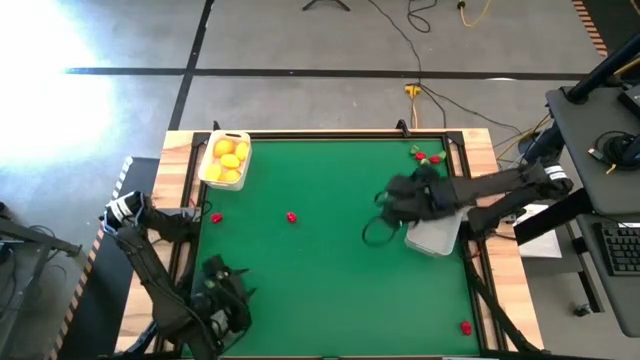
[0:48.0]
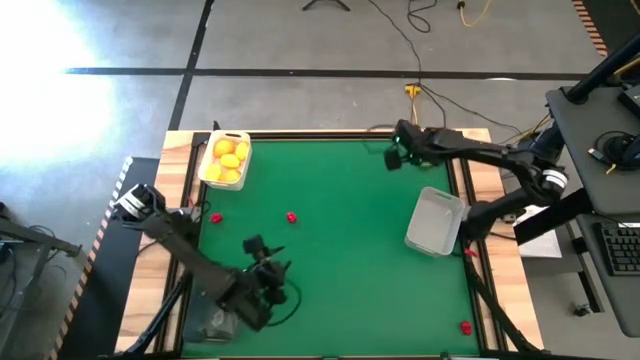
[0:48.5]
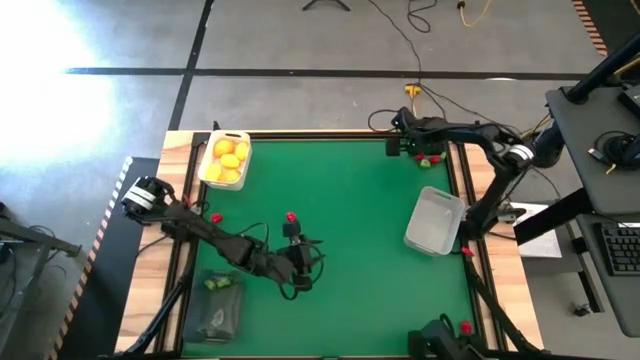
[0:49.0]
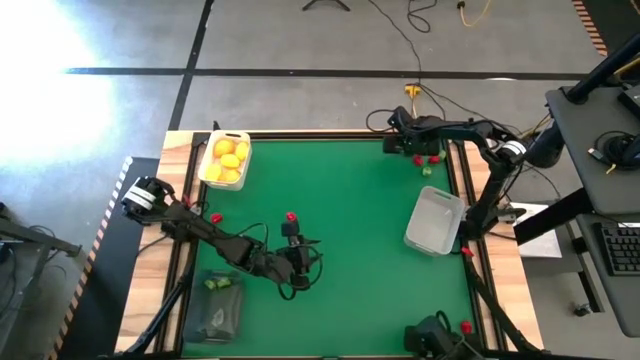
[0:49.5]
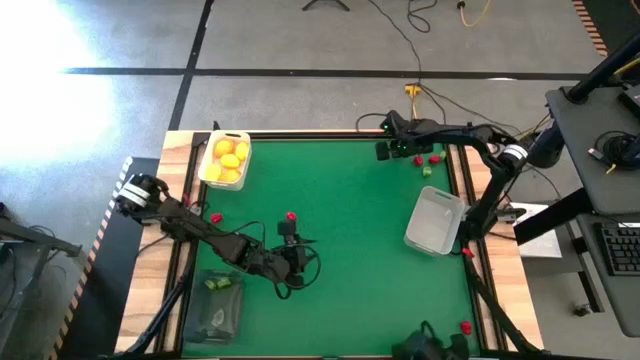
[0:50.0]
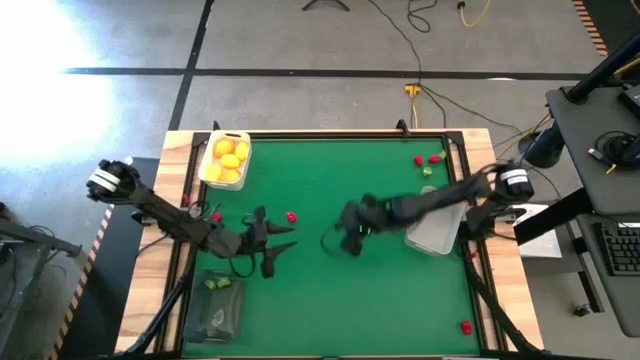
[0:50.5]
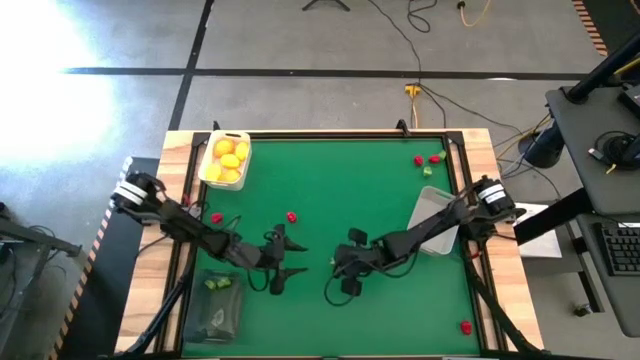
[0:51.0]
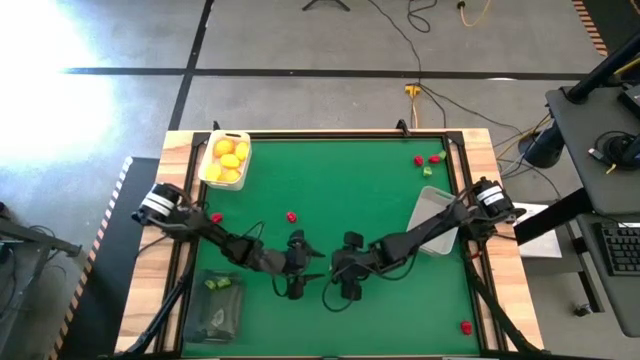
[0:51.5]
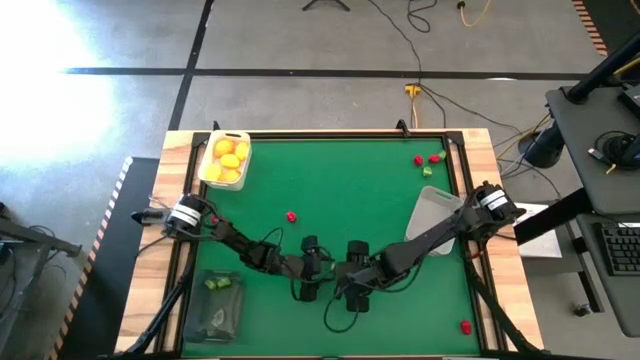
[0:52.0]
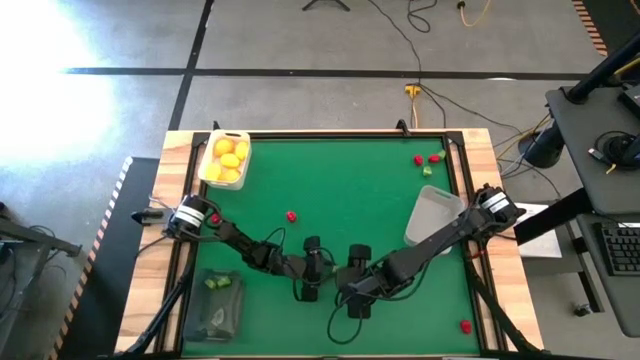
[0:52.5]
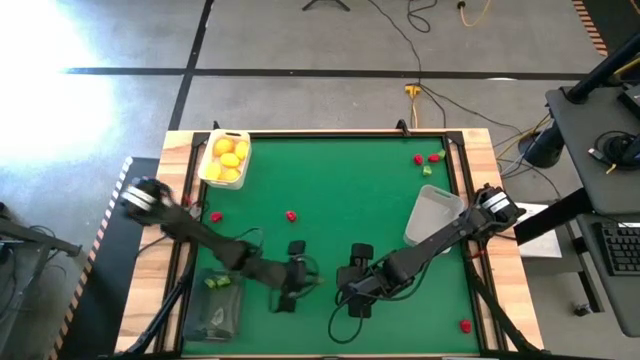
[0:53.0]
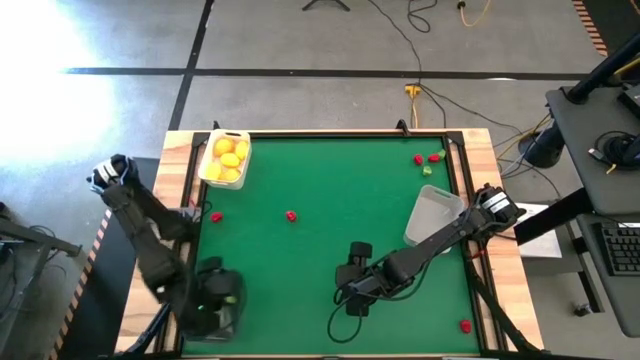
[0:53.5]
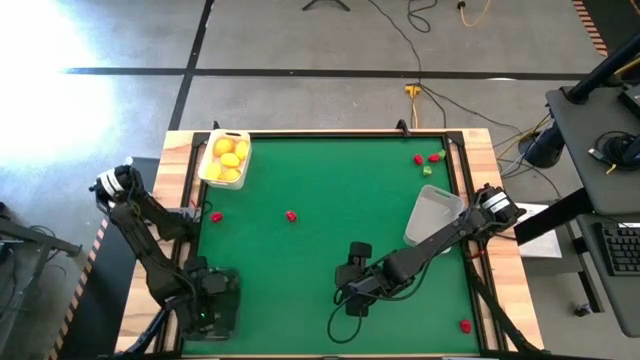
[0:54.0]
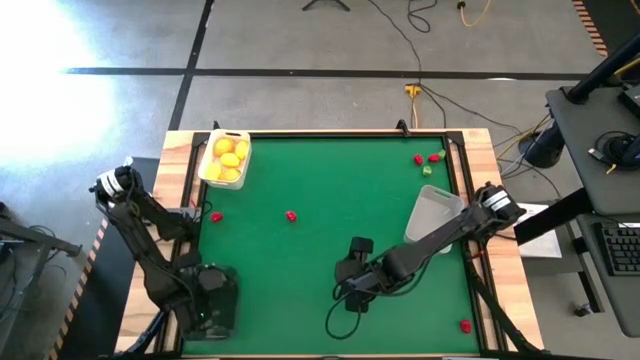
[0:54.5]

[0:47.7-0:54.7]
Task: Sort produce into baskets
Put the green chili pepper into the black bin

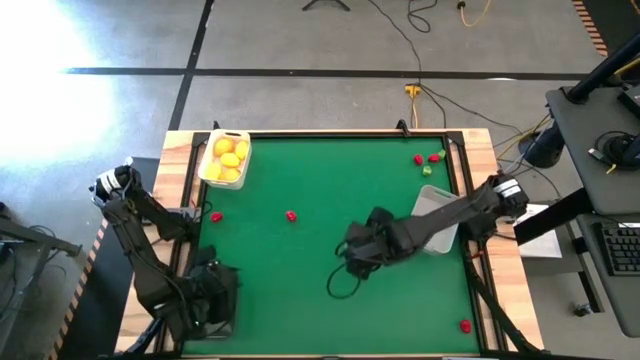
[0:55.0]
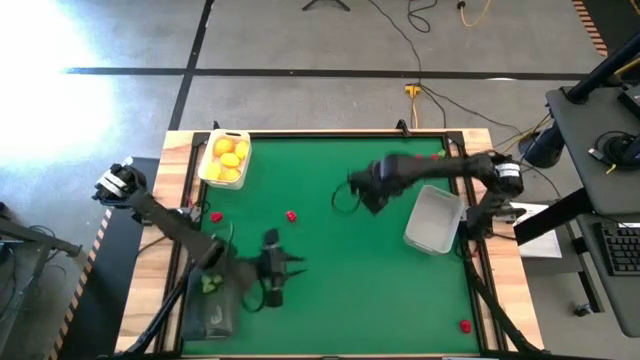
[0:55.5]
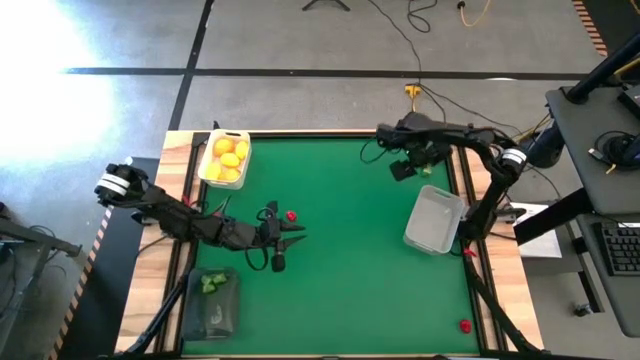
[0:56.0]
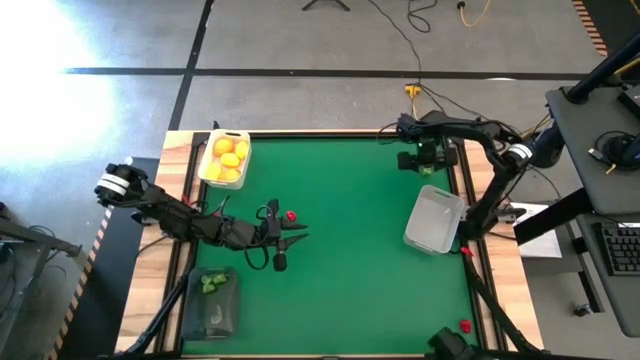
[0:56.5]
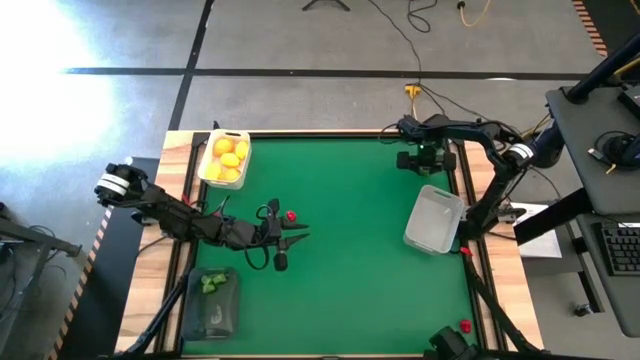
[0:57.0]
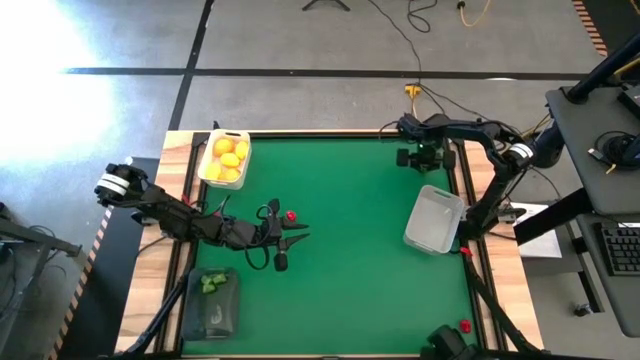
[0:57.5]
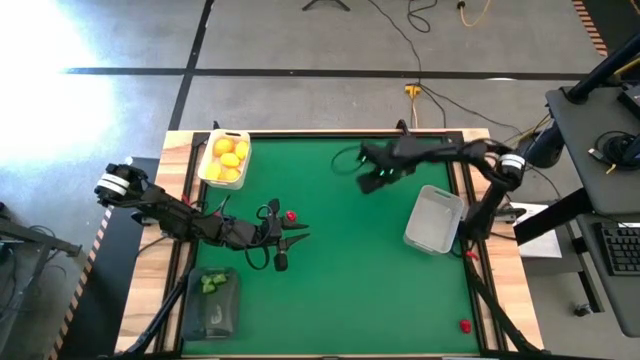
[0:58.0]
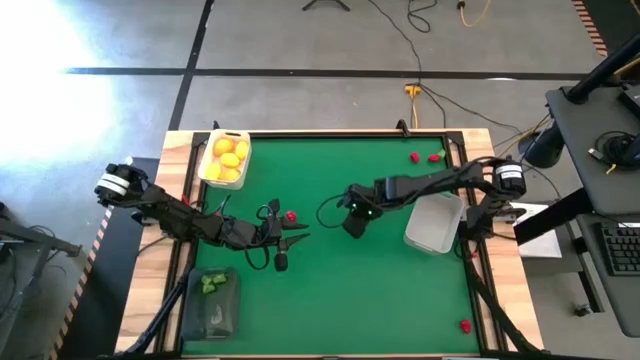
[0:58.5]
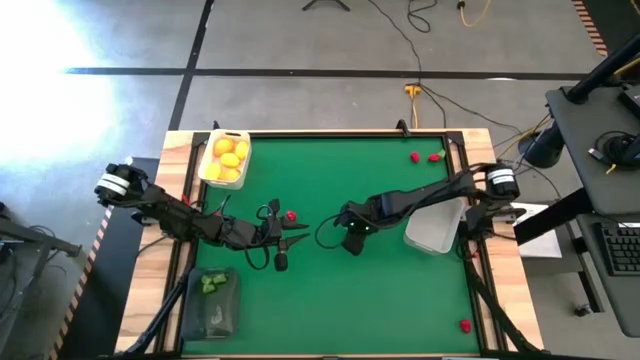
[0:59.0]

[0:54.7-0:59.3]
Move the green chili peppers to the center of the table

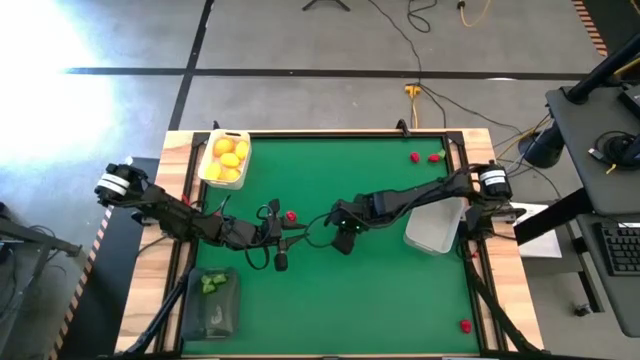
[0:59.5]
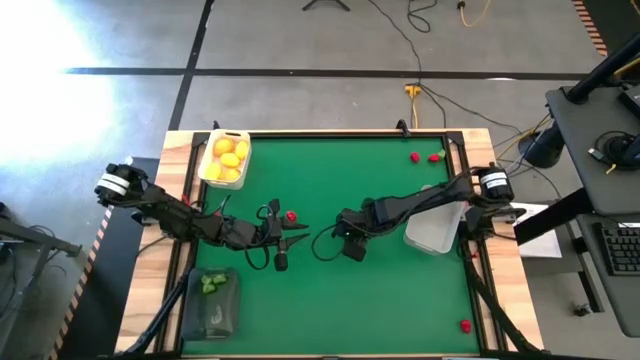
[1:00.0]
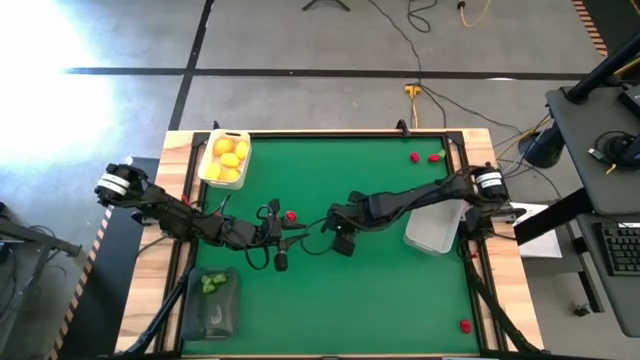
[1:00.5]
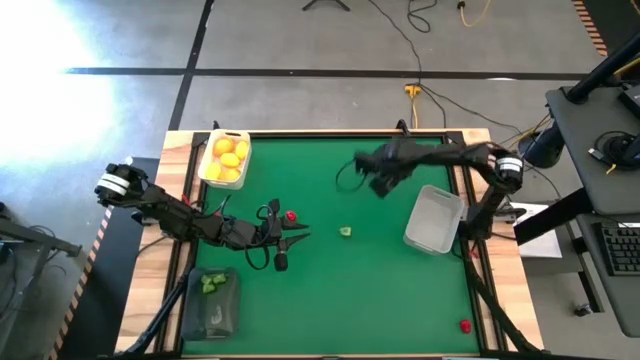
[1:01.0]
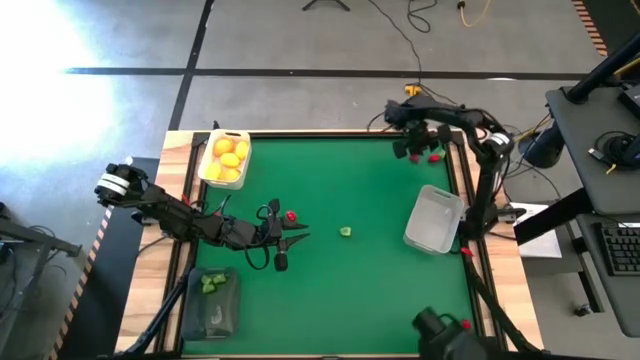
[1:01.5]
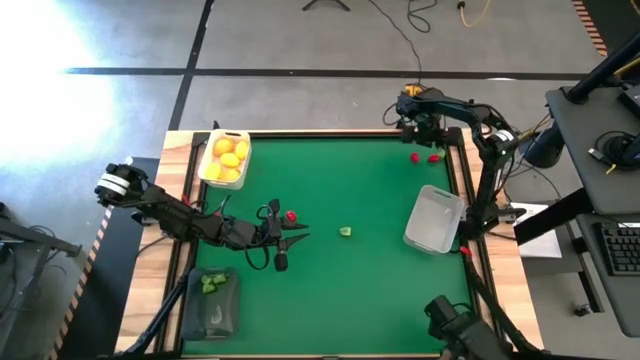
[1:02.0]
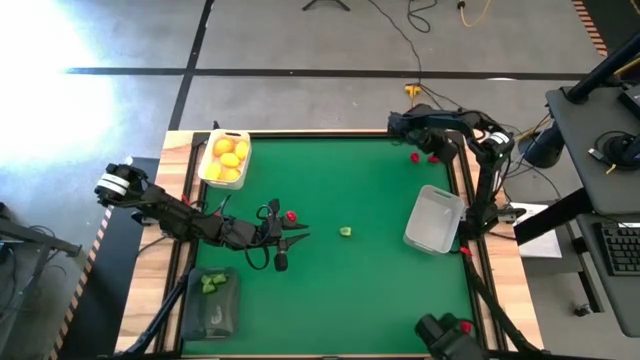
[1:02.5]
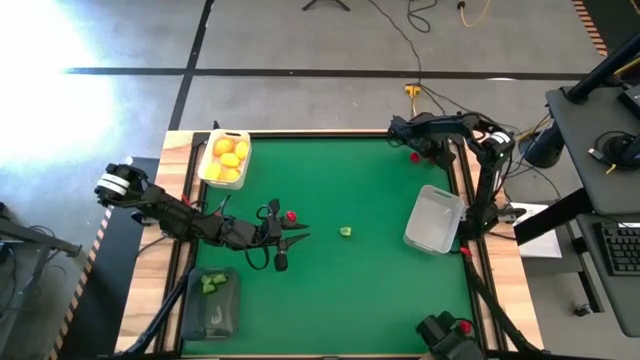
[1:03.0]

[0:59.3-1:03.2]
Put the green chili peppers into the black bin

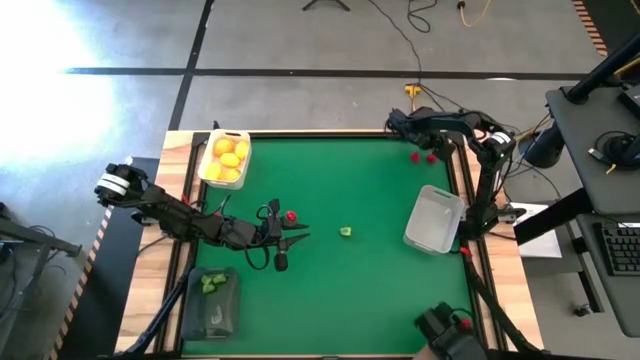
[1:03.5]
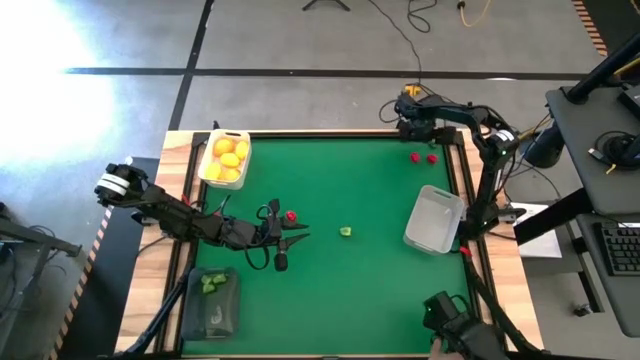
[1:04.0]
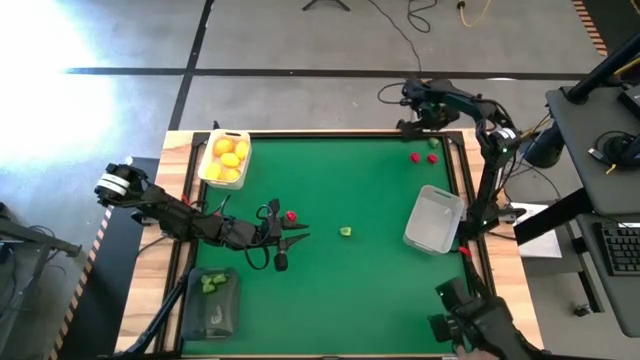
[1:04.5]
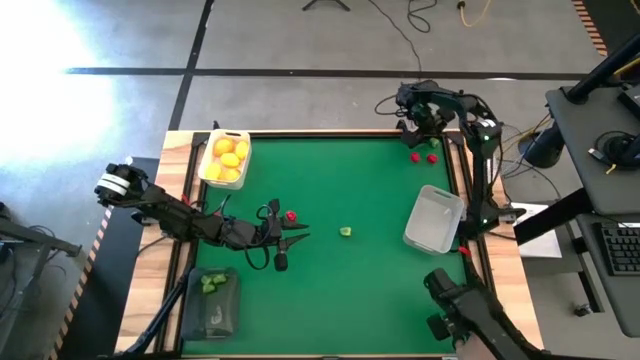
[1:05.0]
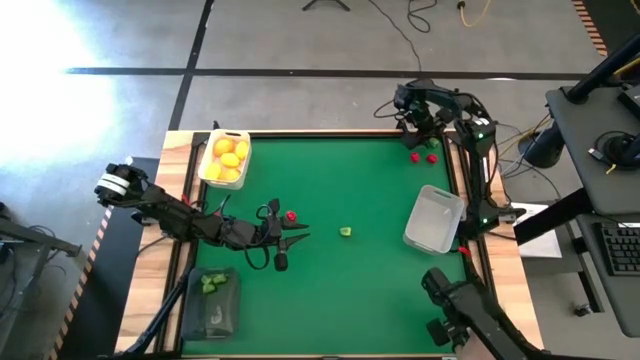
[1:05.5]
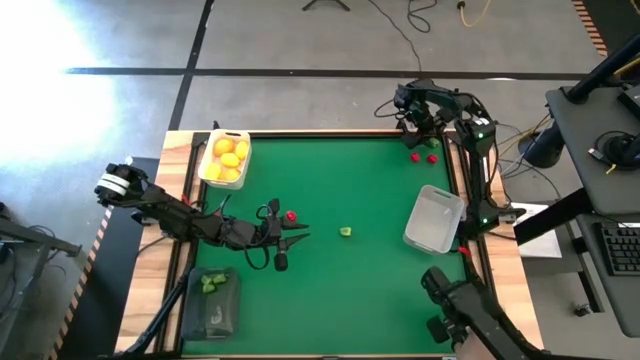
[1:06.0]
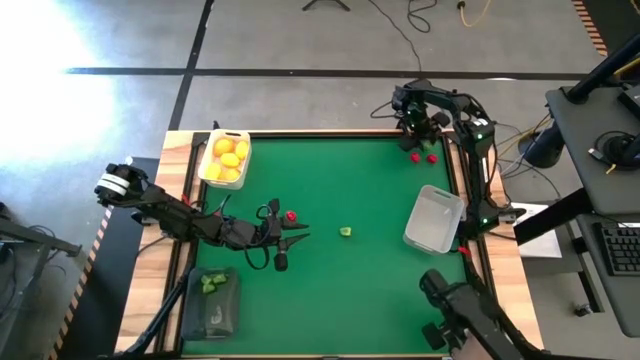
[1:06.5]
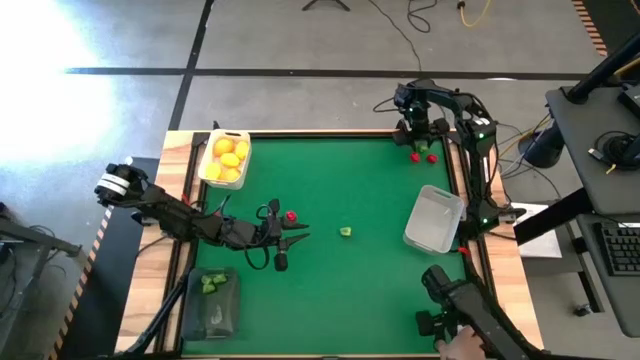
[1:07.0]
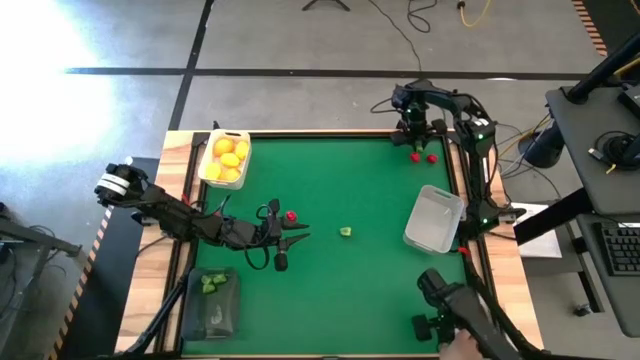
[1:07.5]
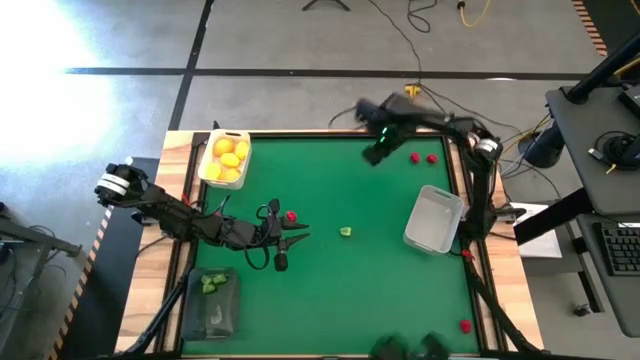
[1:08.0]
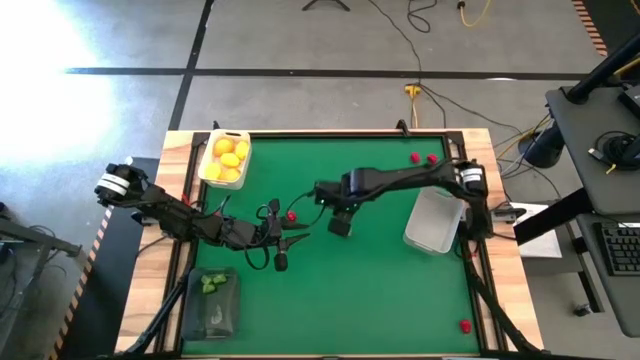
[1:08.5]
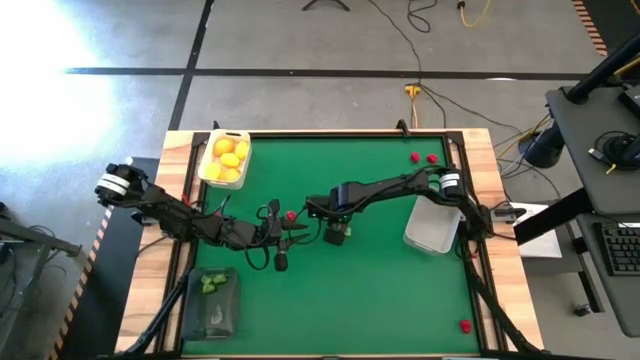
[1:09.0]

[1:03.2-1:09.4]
Put the green chili peppers into the black bin
